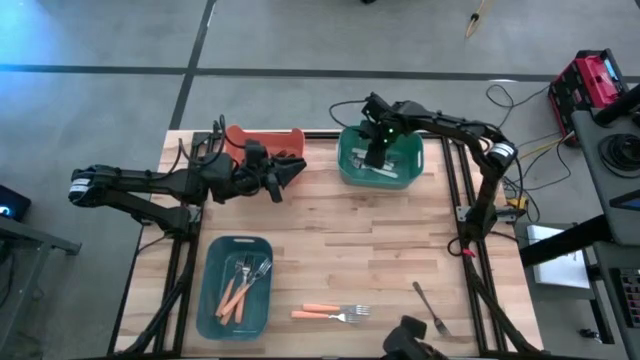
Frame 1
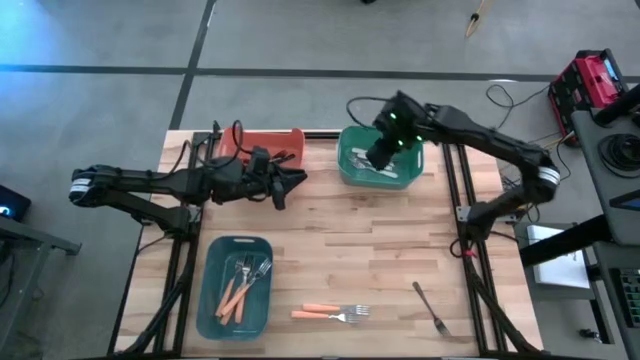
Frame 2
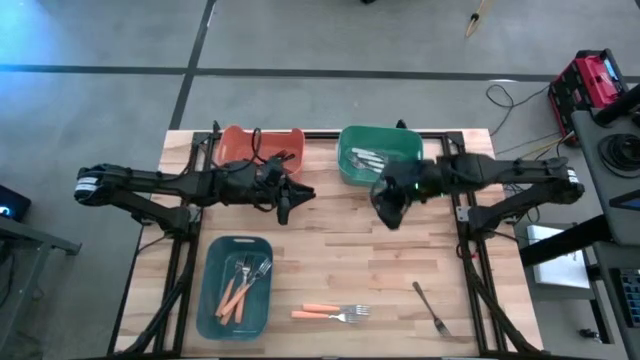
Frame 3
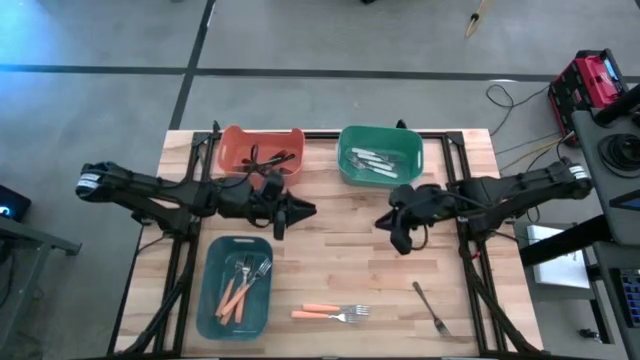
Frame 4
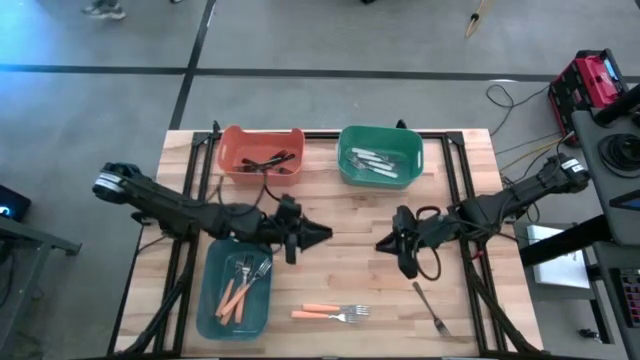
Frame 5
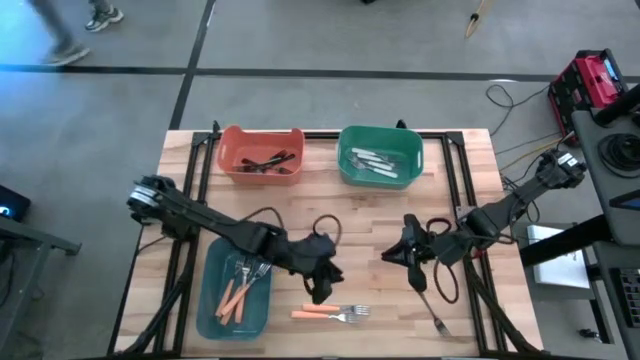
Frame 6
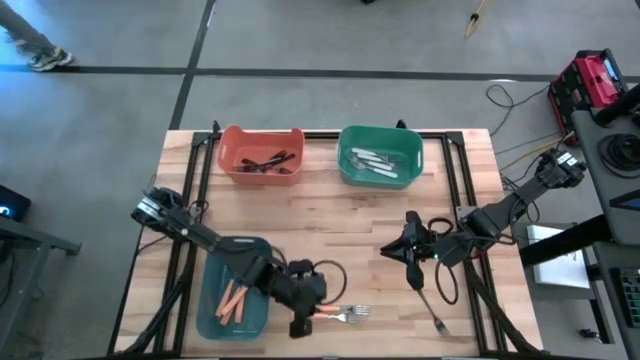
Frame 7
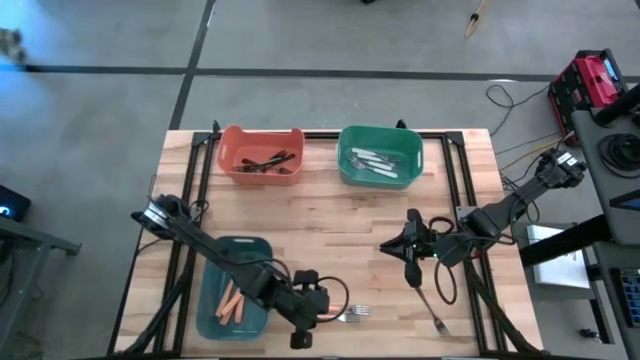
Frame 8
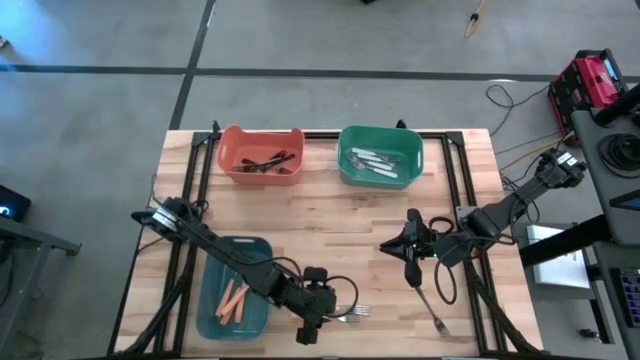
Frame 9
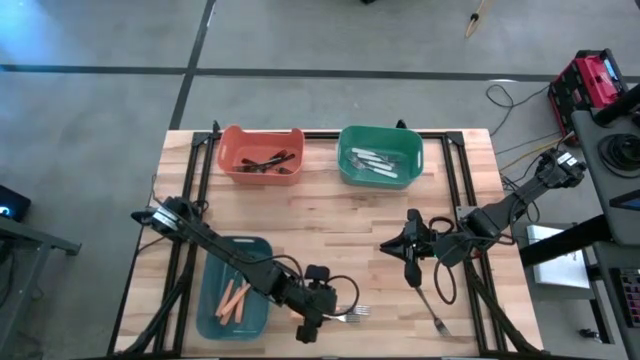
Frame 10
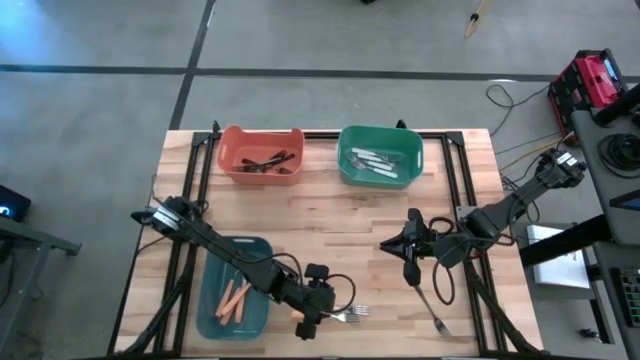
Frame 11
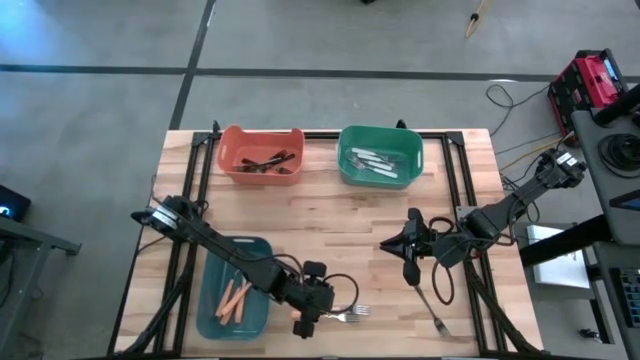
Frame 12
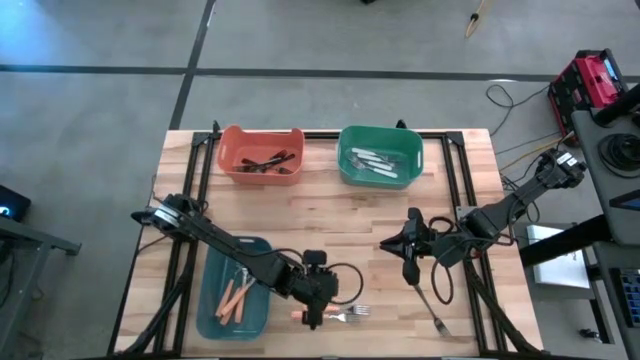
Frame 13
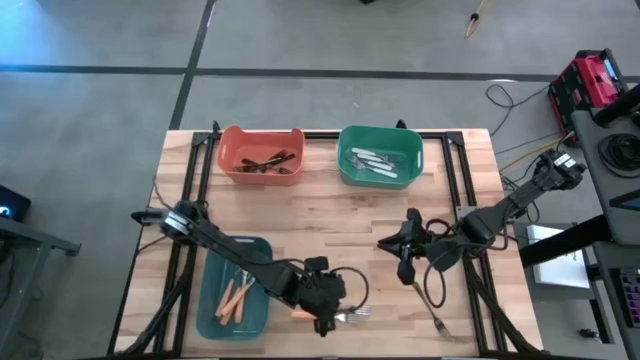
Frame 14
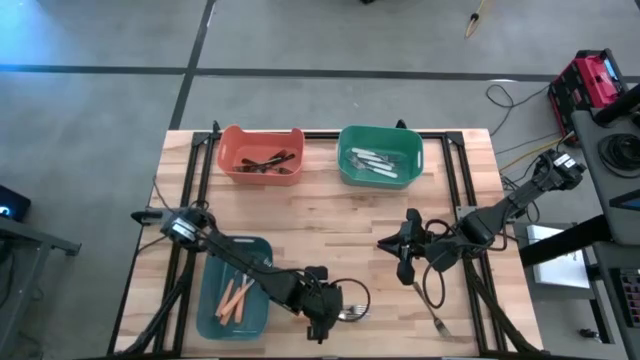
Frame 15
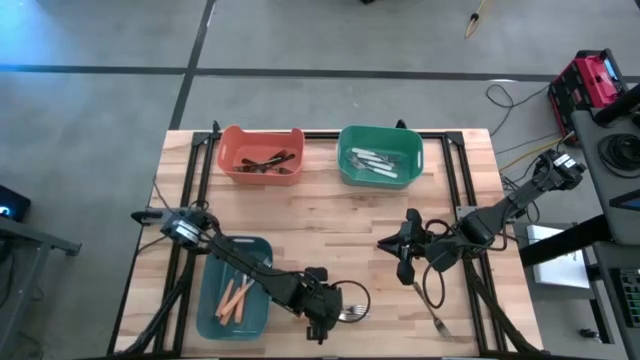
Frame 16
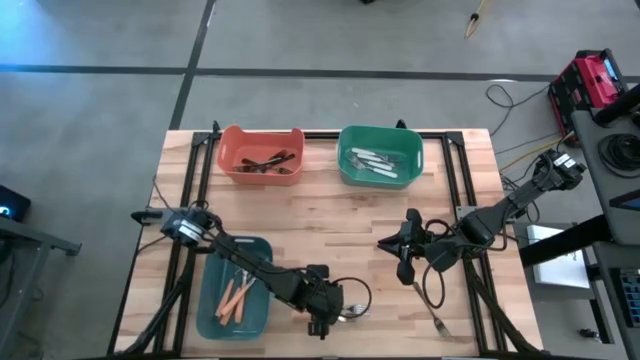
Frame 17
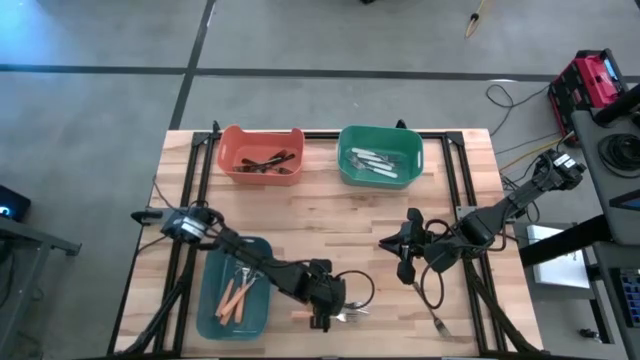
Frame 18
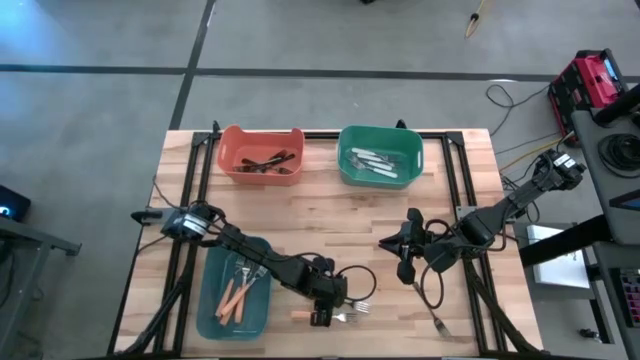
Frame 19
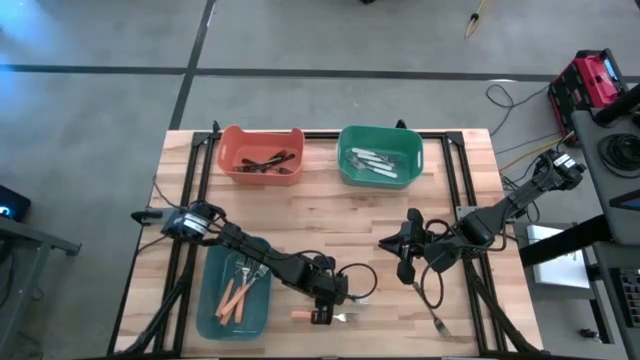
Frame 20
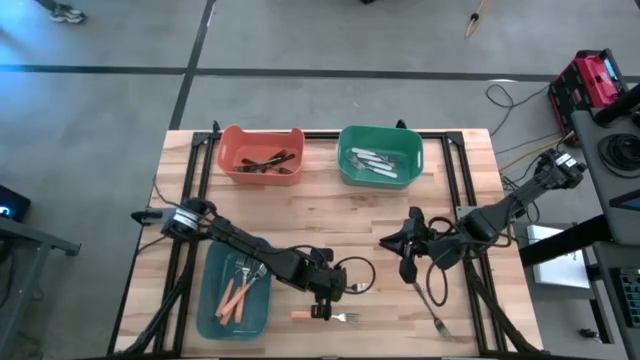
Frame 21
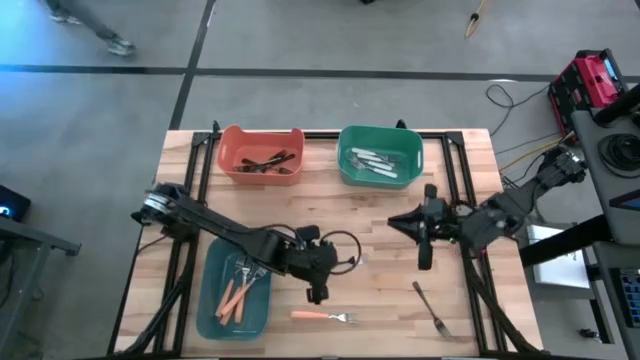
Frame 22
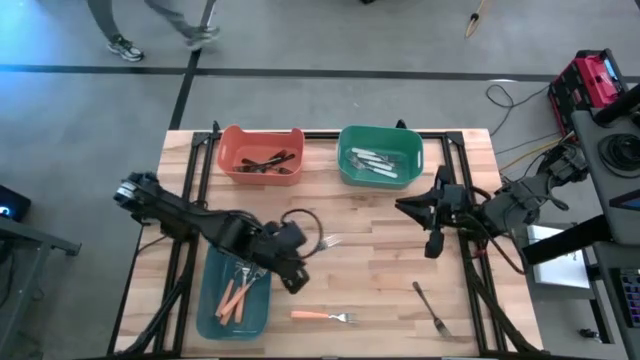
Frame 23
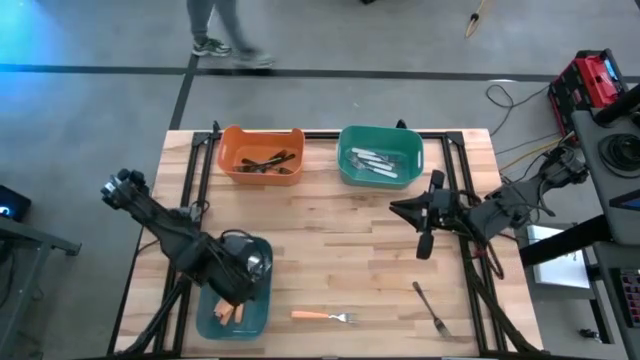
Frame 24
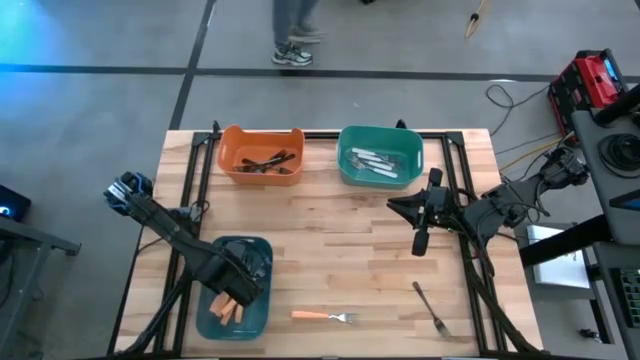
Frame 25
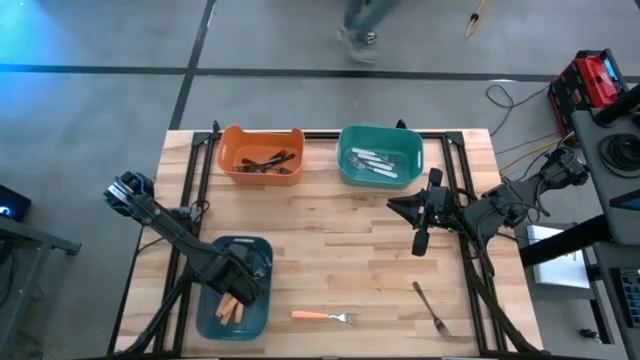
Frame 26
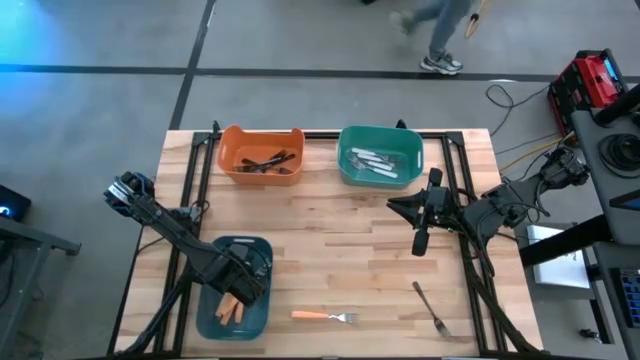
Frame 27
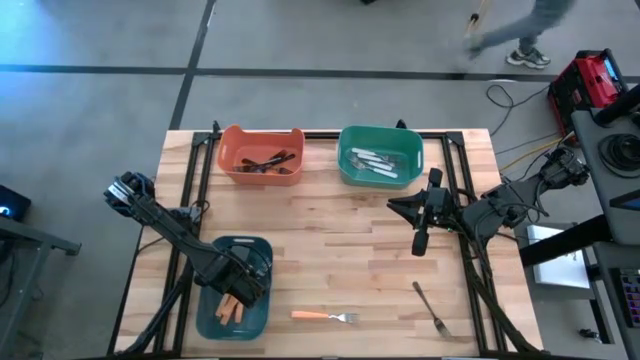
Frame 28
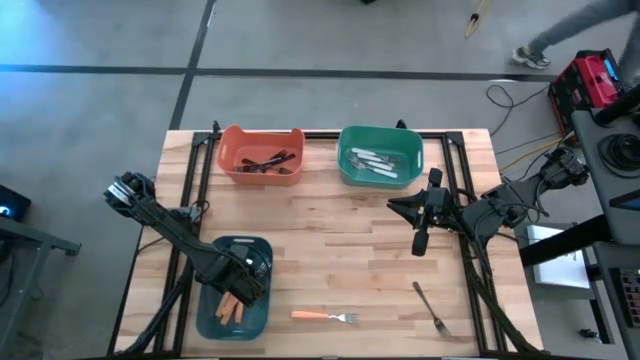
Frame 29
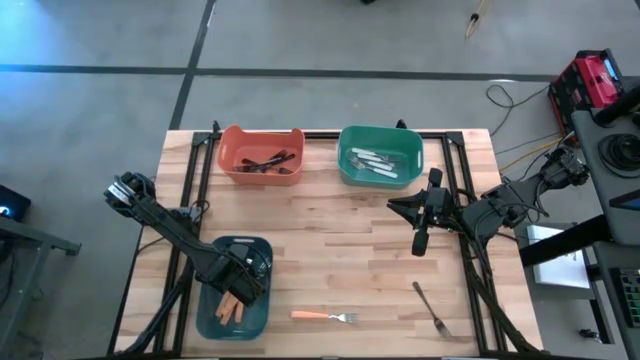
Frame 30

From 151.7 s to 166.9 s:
Task: Sort silverware by color (type)
Put the orange fork into the blue-green bin

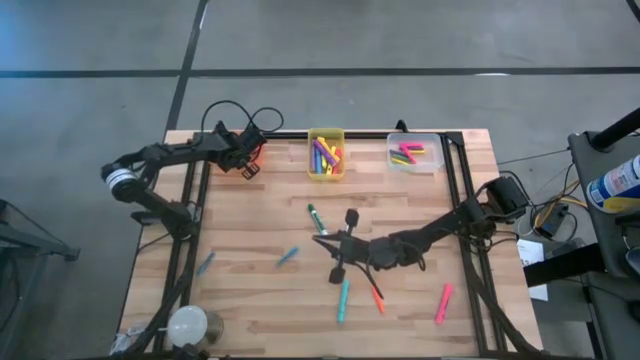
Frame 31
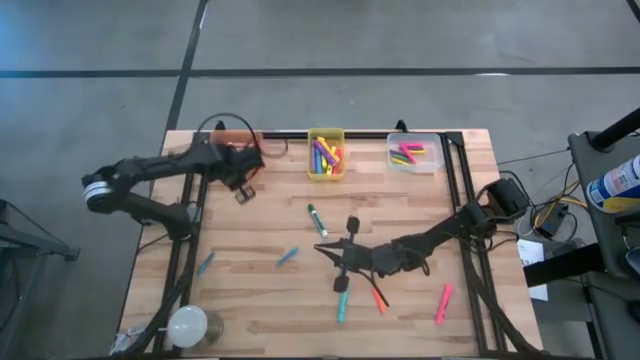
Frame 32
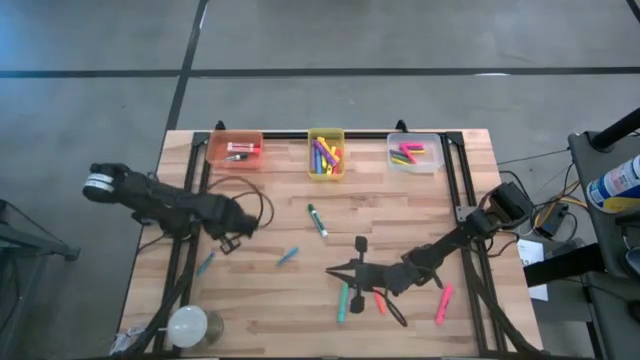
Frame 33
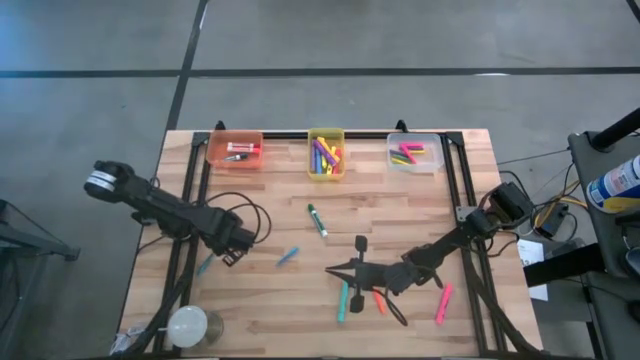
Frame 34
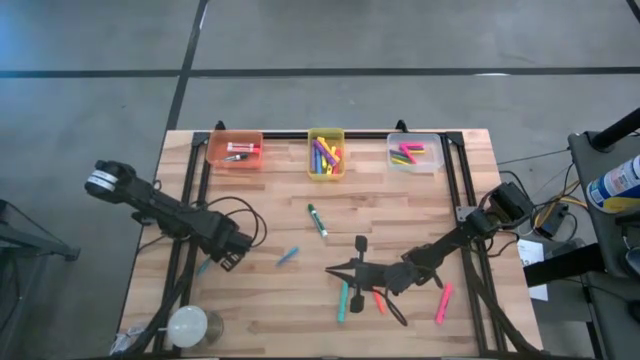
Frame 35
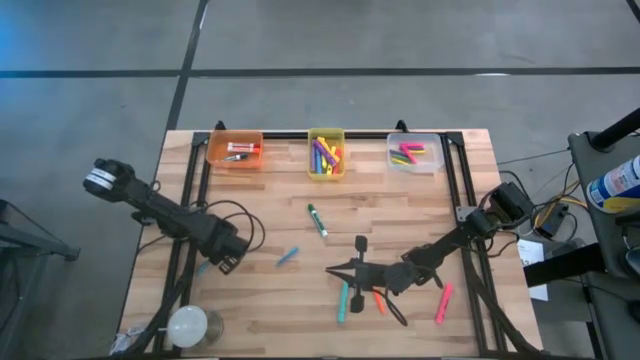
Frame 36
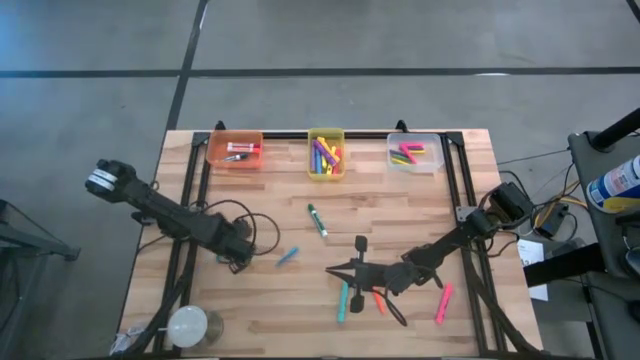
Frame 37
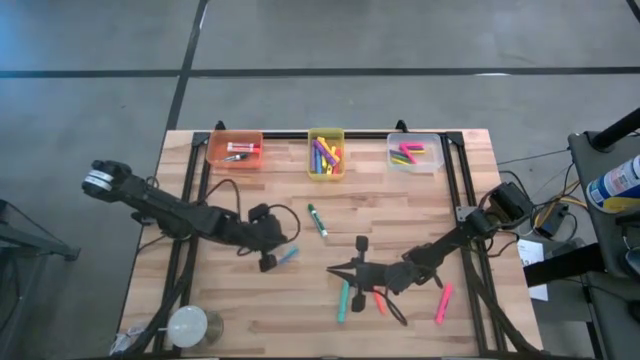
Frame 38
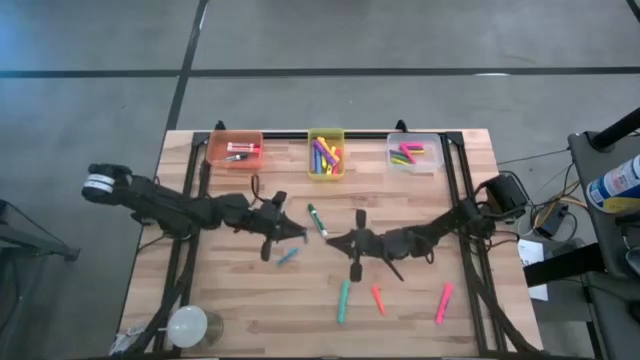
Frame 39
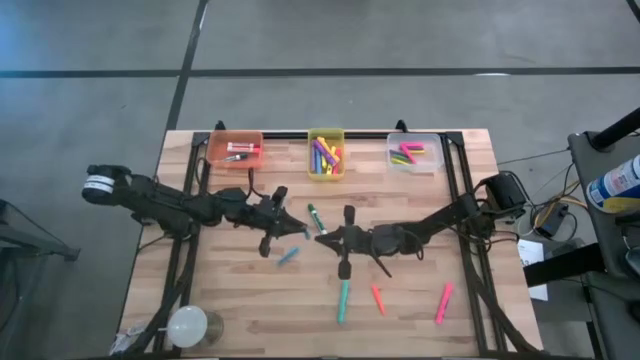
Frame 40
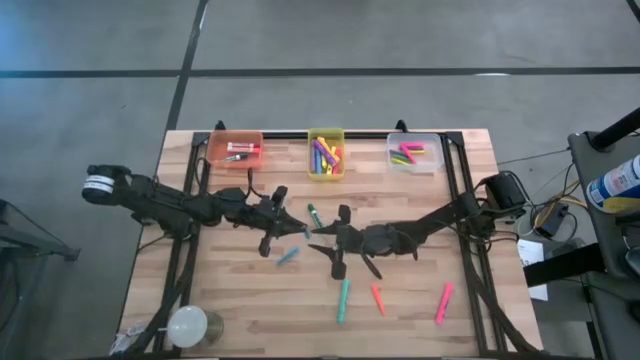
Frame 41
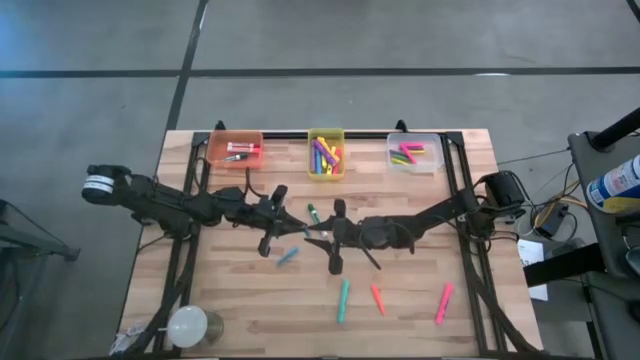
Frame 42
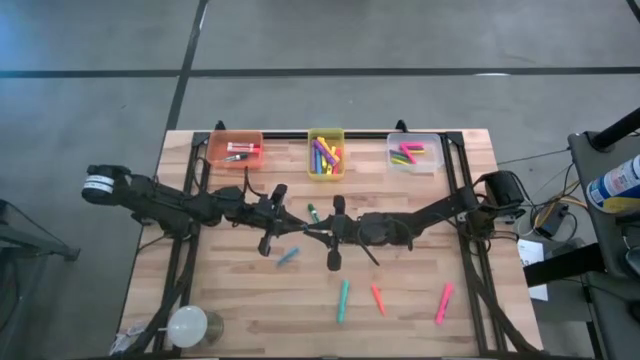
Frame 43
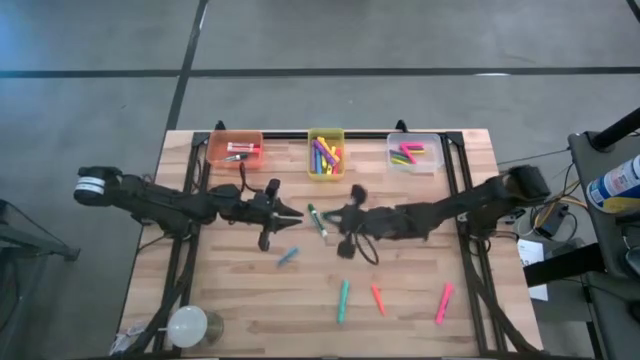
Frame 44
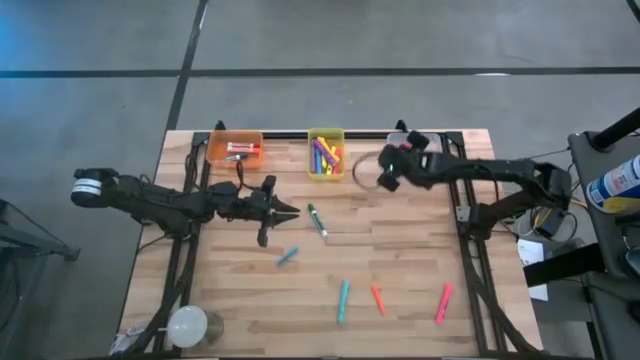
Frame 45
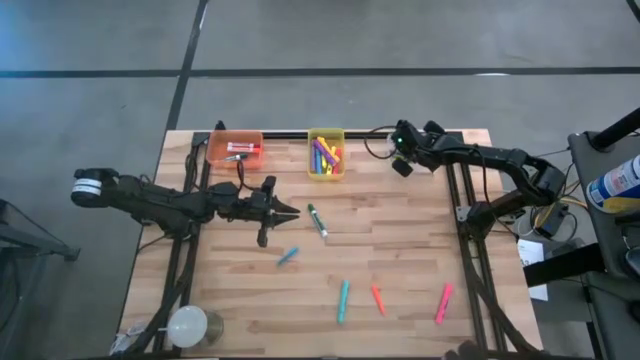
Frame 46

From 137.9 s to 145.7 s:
Task: Pick & Place Markers
Put the left blue pen into the transparent bin
